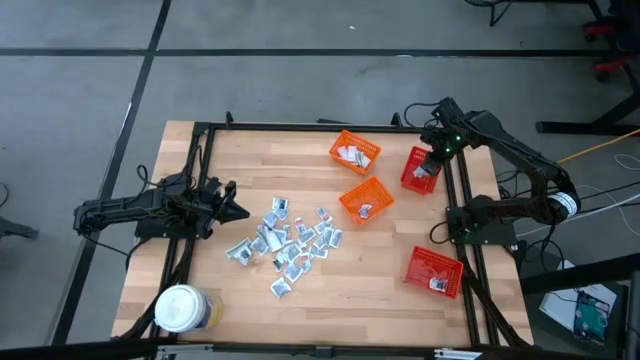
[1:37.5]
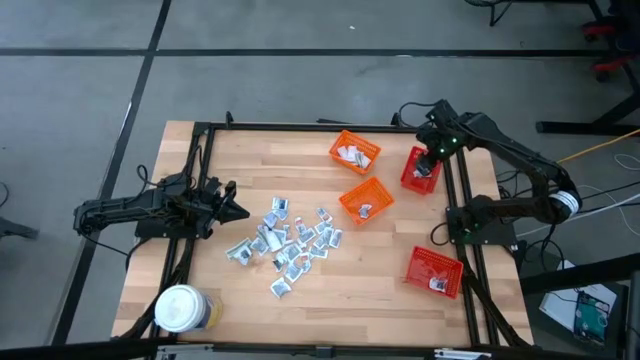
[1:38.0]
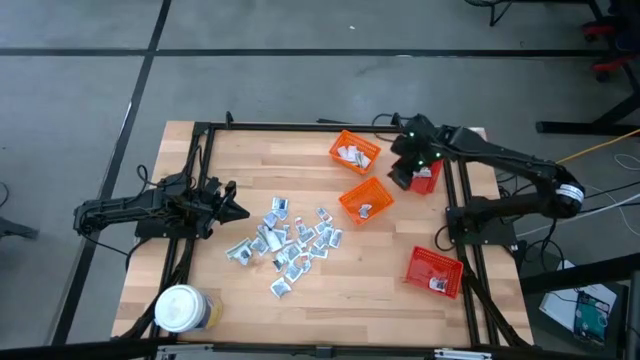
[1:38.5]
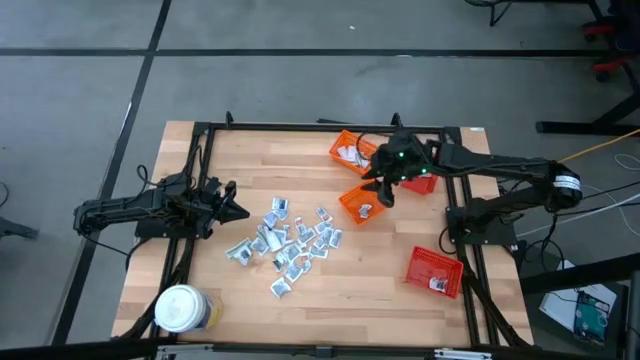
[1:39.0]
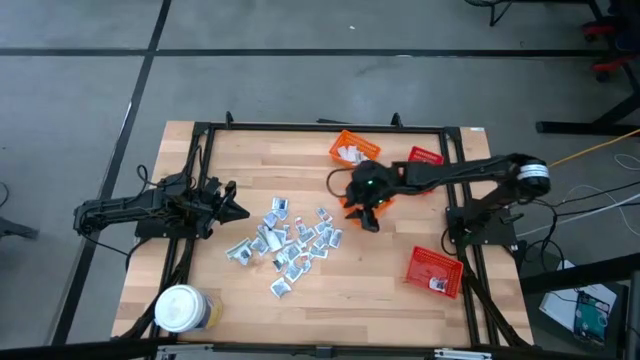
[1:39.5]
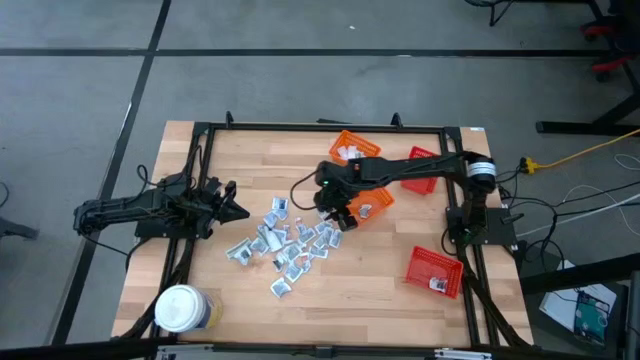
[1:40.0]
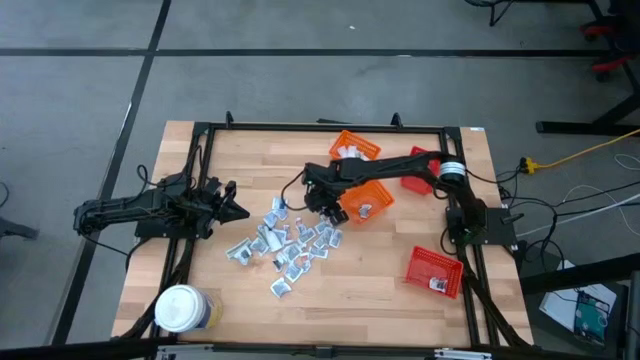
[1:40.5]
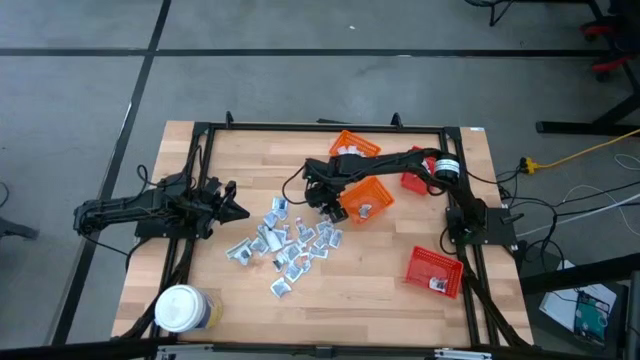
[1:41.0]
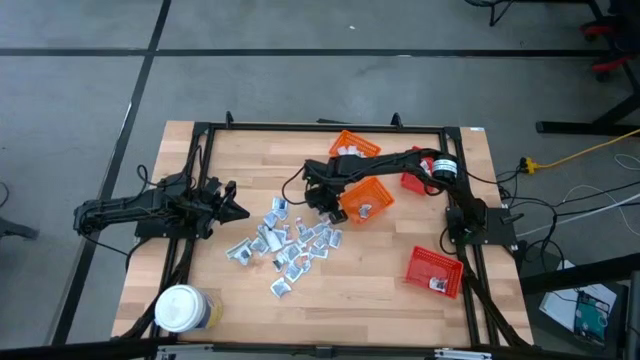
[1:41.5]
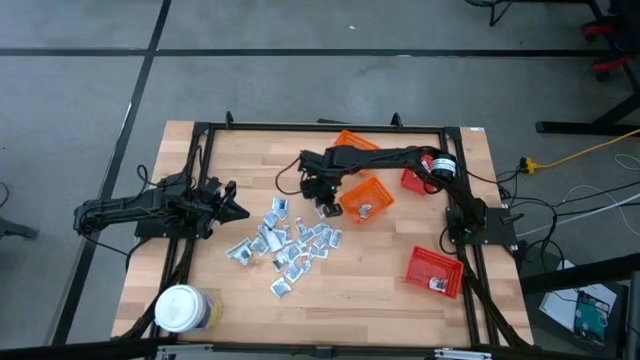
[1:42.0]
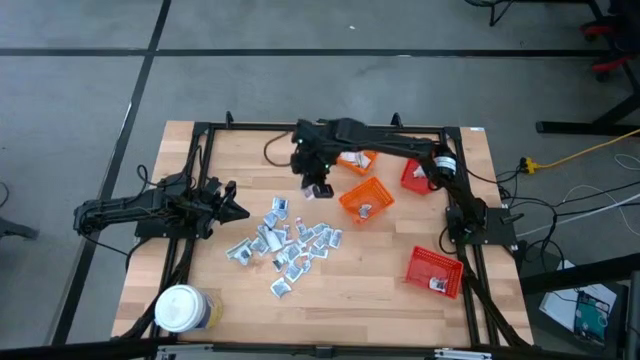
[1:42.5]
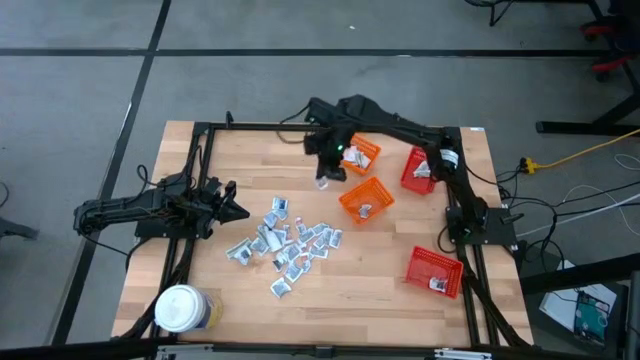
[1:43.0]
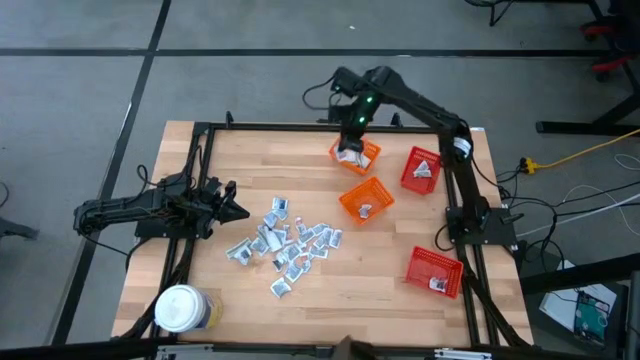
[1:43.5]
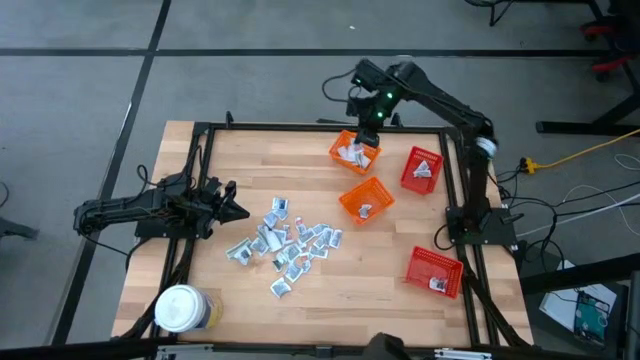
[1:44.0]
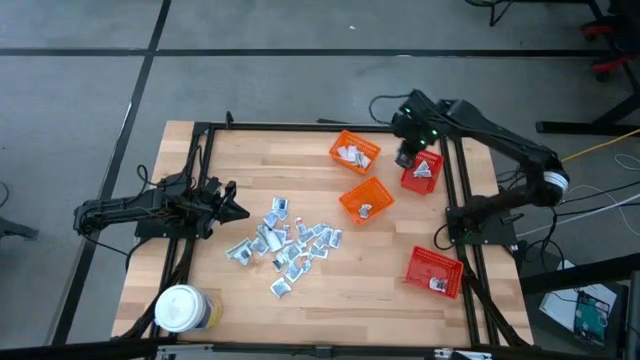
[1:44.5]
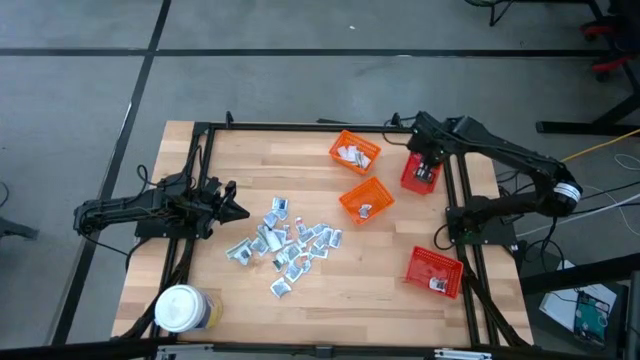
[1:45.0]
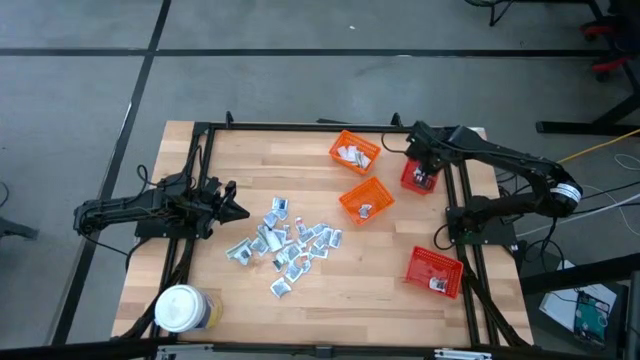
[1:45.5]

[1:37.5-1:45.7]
Task: Pick & Place First Aid Supplies
Put the orange ointment pack into the top red bin

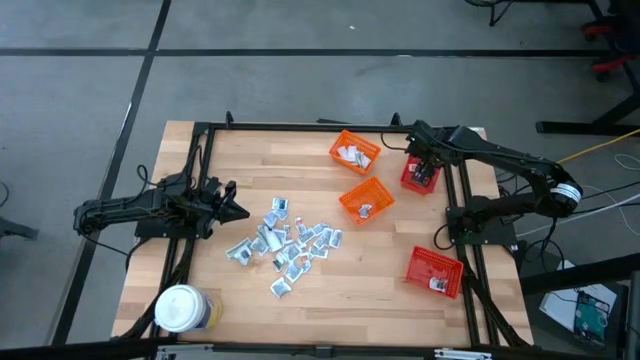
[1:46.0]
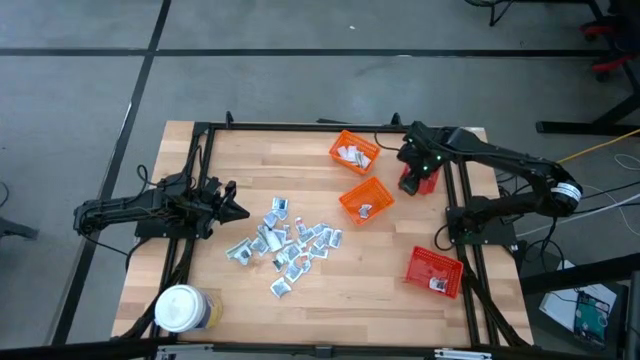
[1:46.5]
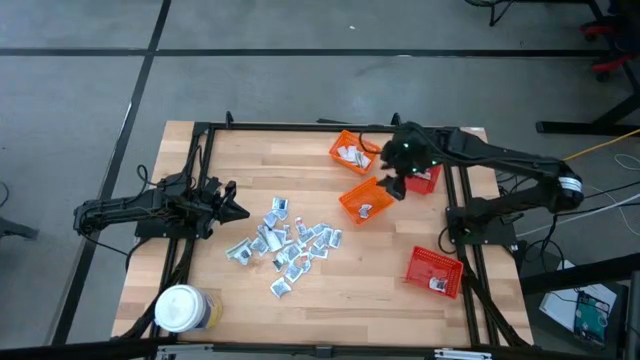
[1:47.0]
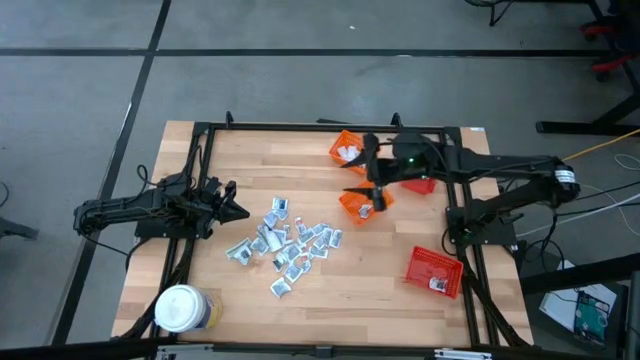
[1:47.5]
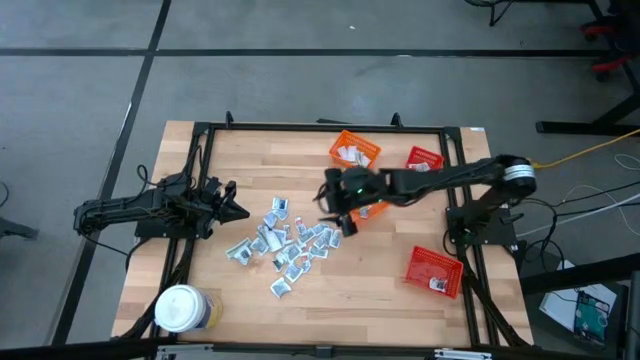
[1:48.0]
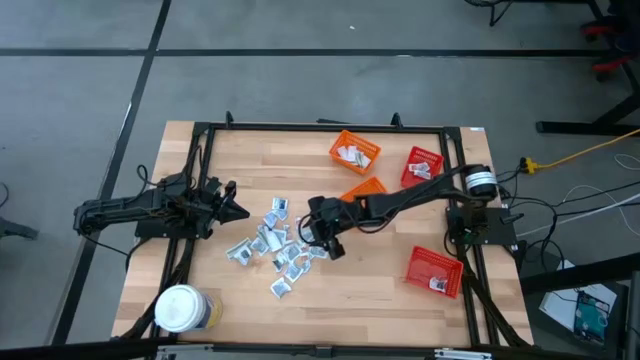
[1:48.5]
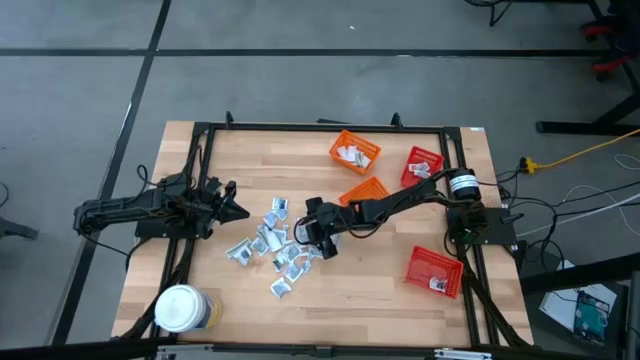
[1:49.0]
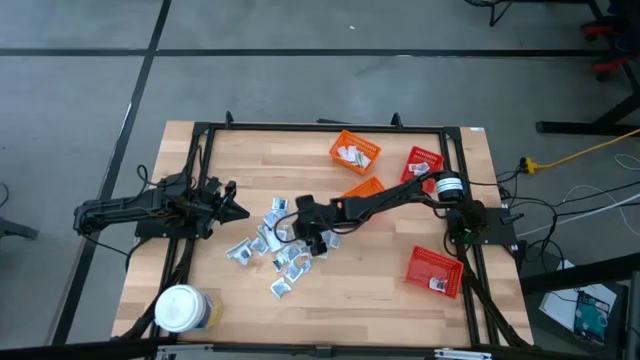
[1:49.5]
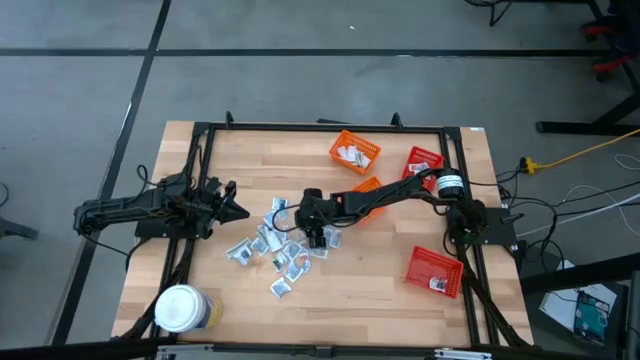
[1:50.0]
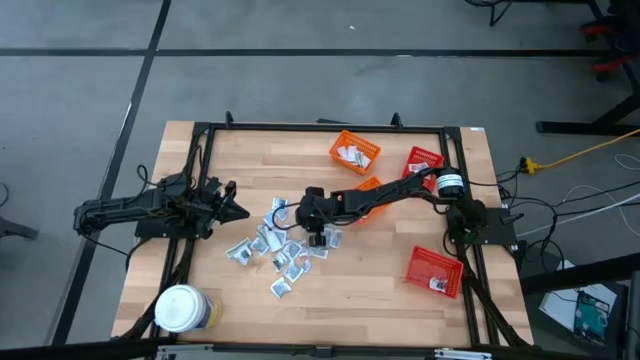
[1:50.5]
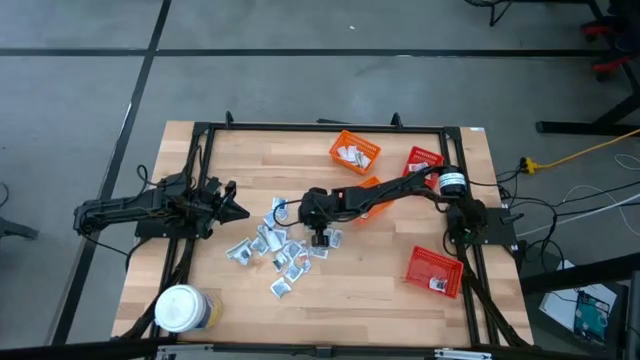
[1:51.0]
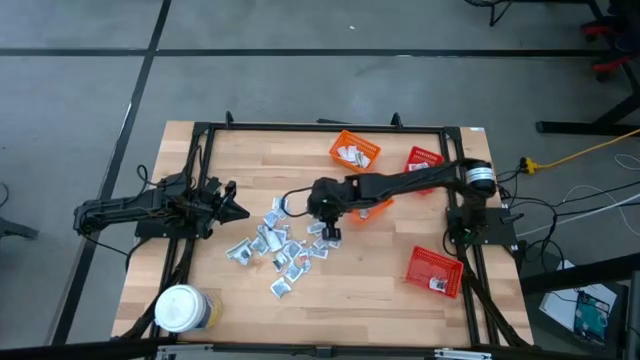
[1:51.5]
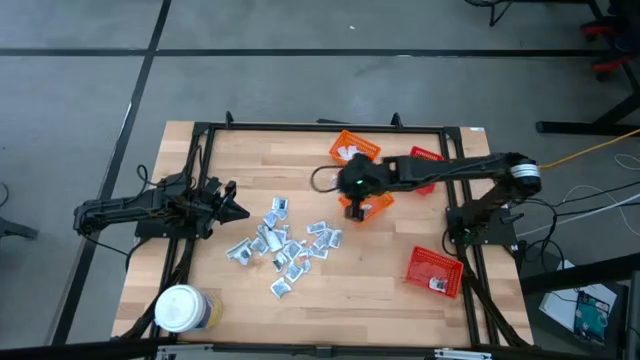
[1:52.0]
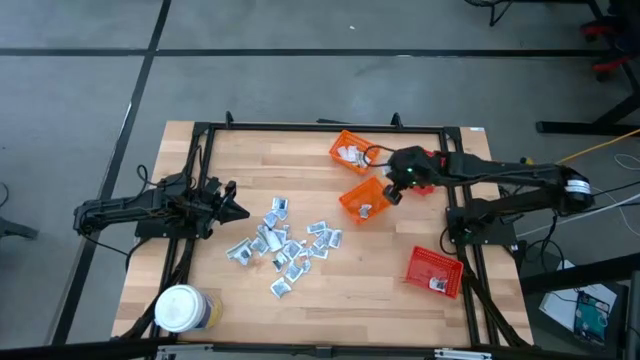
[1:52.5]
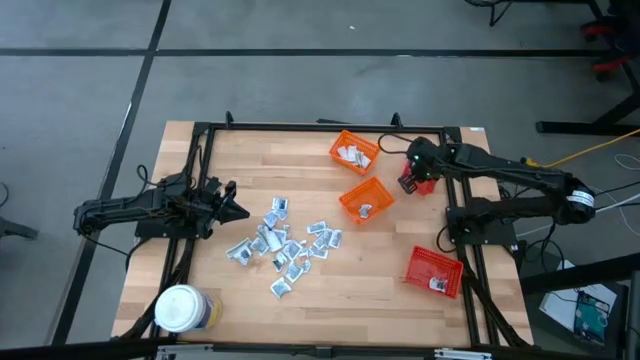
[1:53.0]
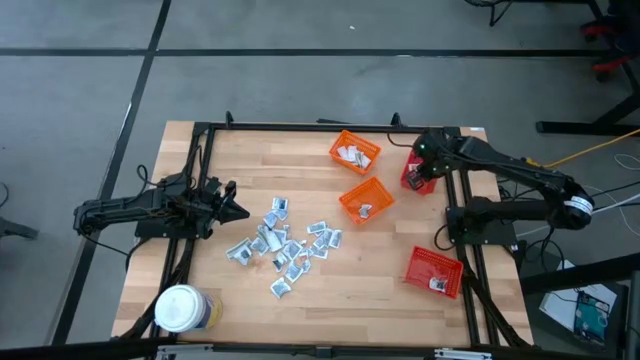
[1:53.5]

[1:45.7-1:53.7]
Put the orange ointment pack into the top red bin

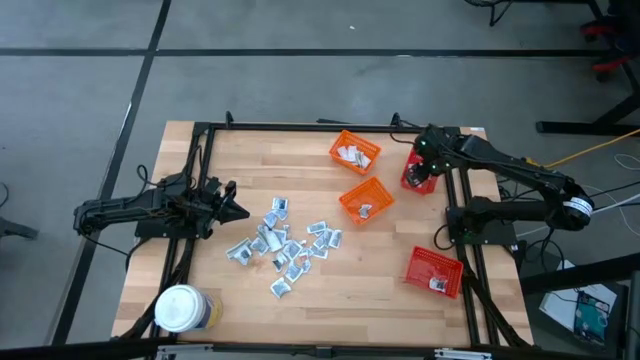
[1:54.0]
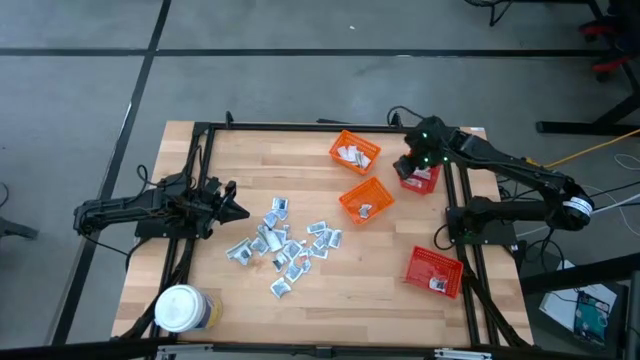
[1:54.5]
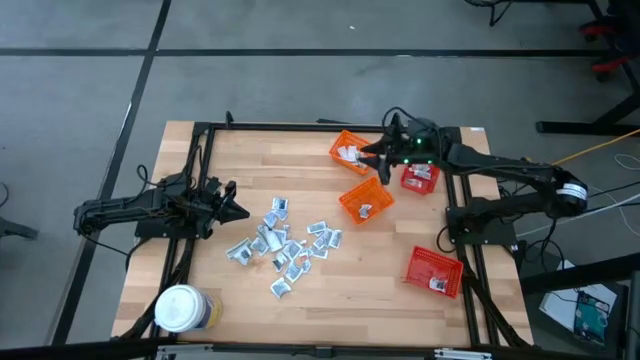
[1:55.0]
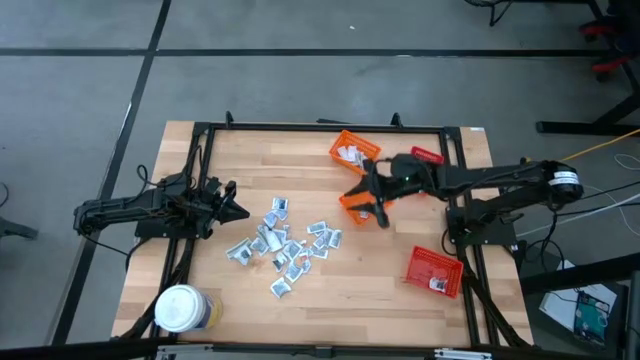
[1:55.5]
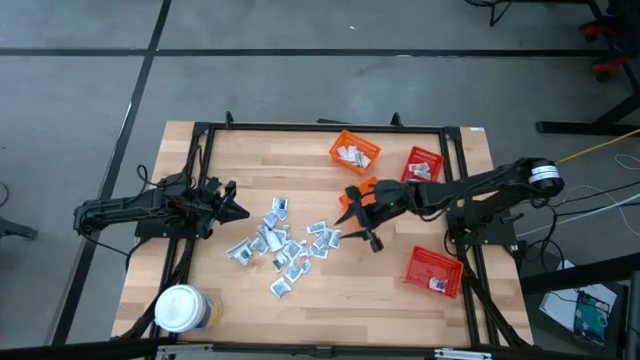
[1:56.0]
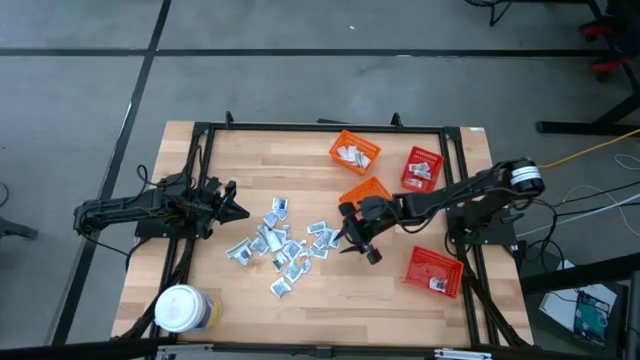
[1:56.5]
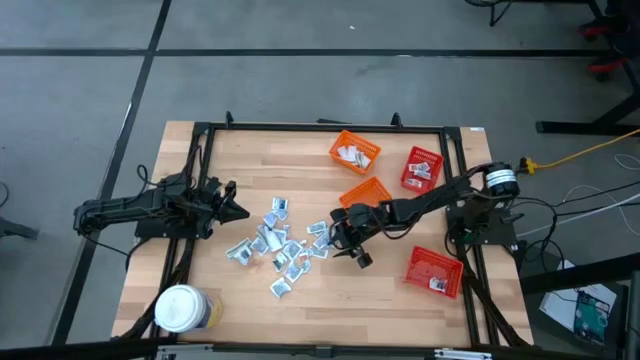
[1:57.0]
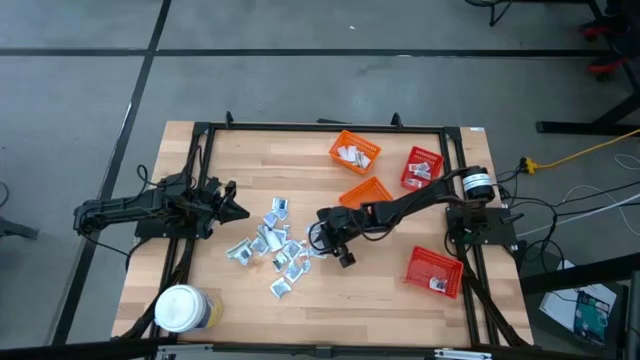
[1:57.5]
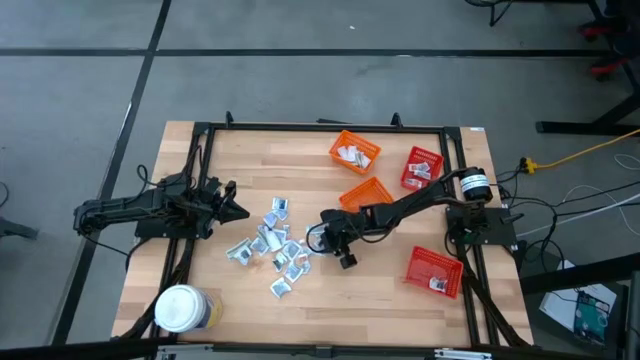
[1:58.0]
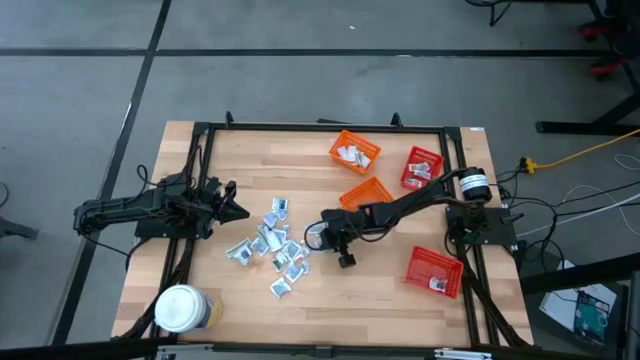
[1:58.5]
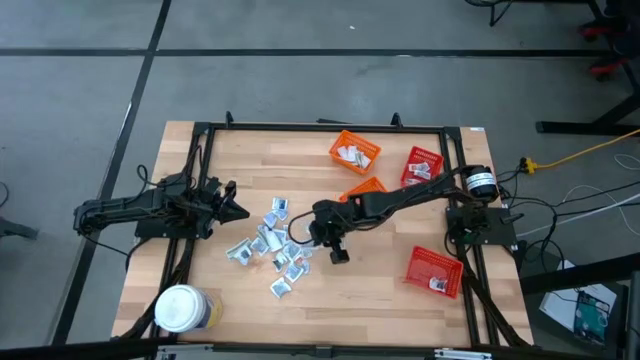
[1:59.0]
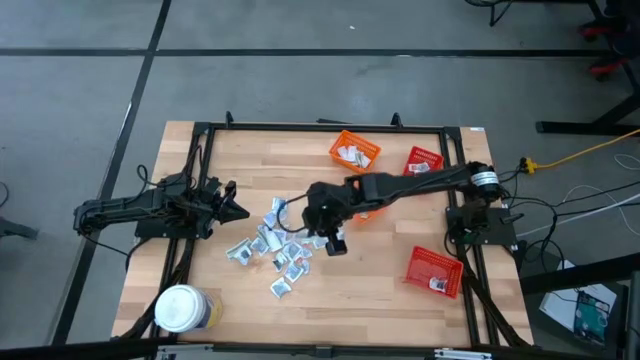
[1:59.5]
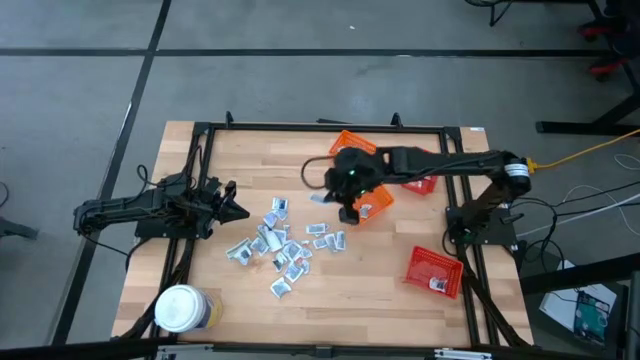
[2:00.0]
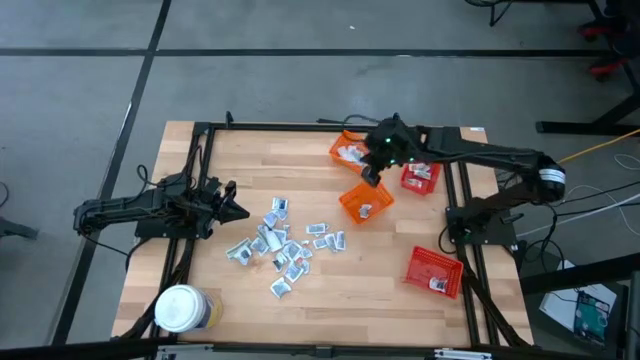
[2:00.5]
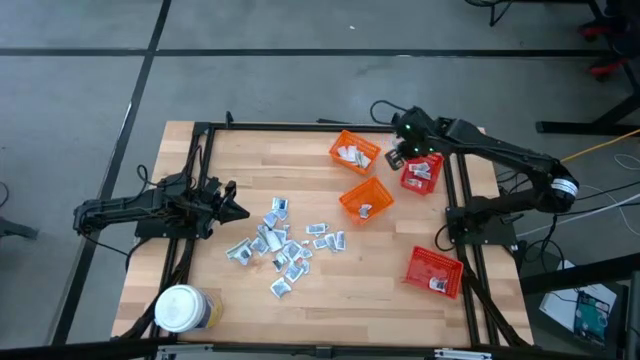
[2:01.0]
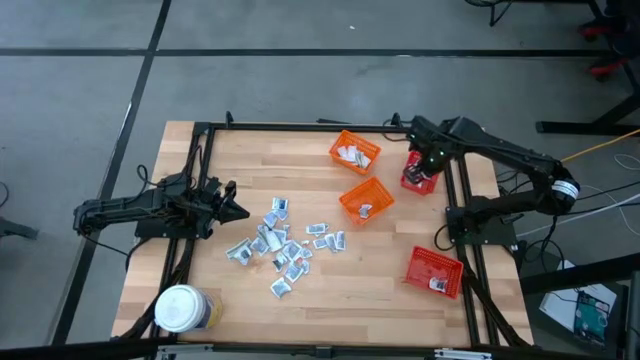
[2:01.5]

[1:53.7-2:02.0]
Put the orange ointment pack into the top red bin
